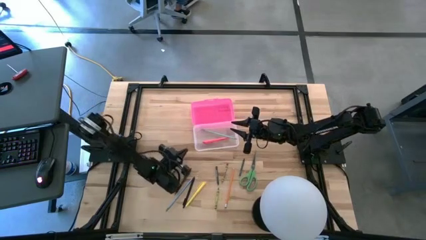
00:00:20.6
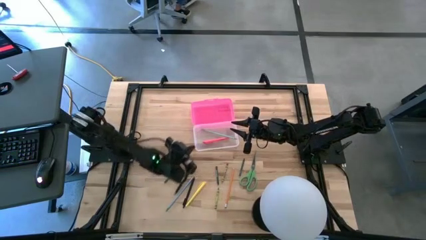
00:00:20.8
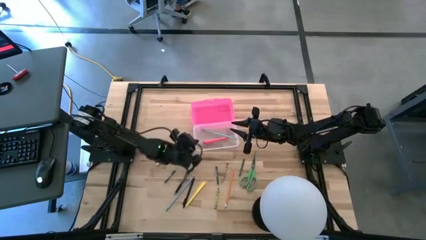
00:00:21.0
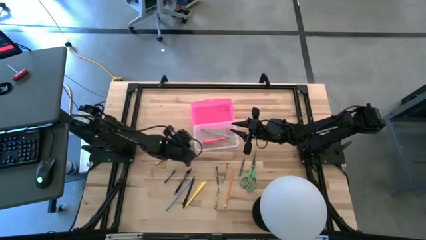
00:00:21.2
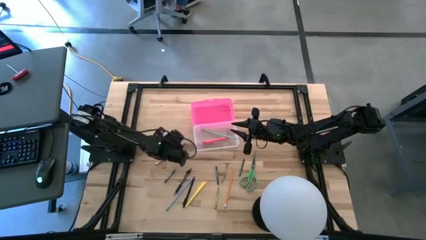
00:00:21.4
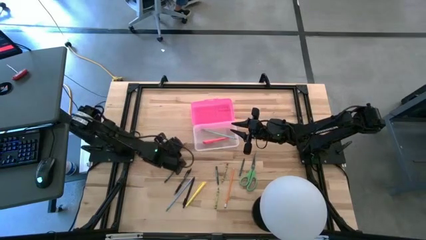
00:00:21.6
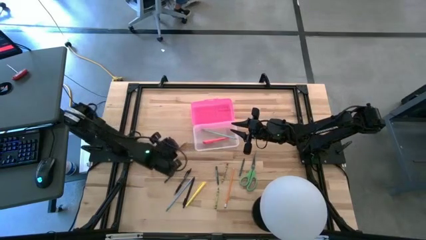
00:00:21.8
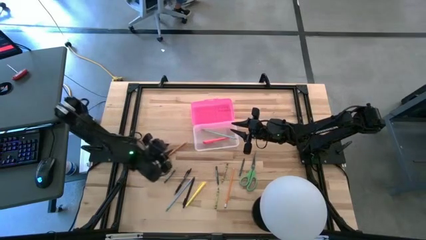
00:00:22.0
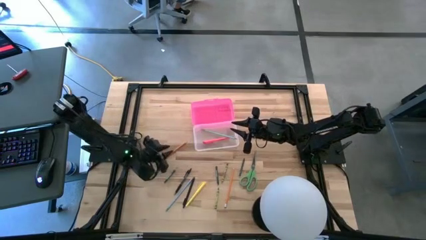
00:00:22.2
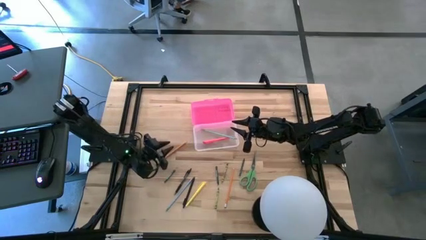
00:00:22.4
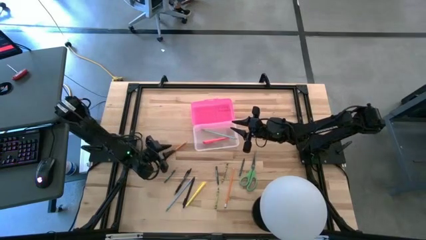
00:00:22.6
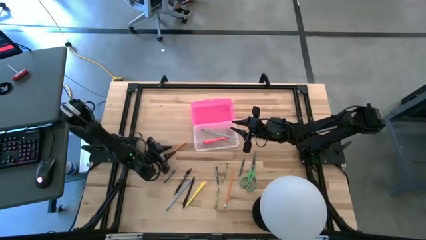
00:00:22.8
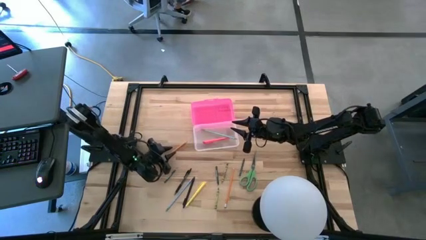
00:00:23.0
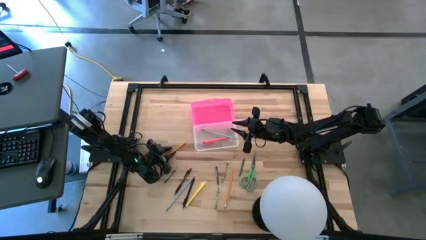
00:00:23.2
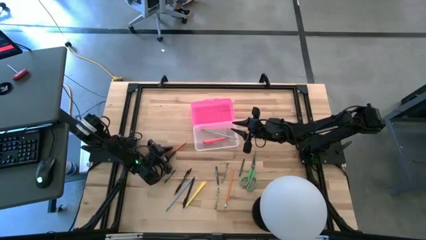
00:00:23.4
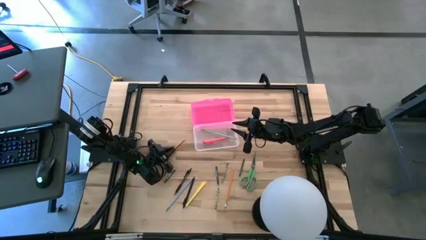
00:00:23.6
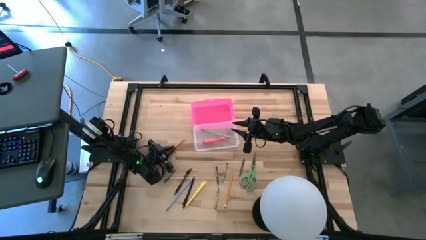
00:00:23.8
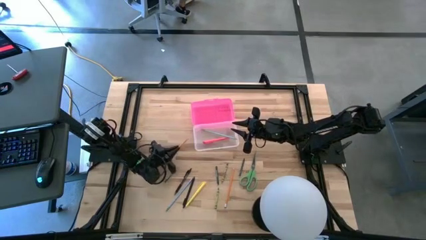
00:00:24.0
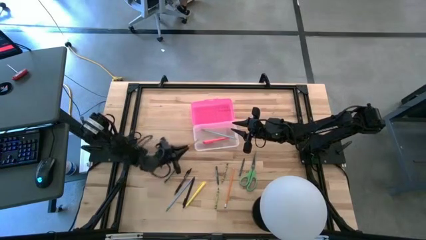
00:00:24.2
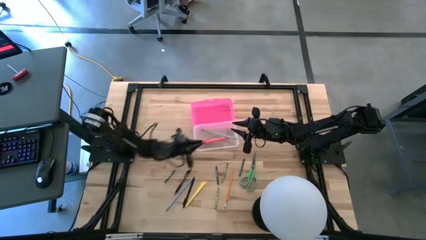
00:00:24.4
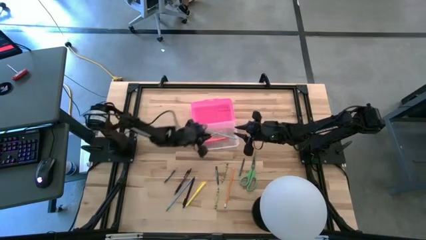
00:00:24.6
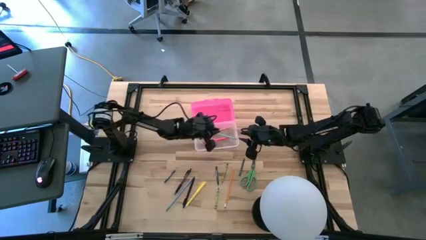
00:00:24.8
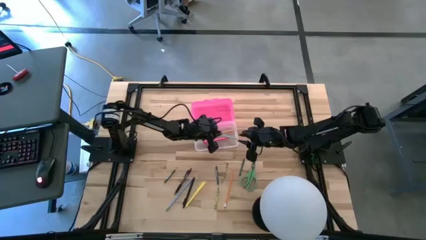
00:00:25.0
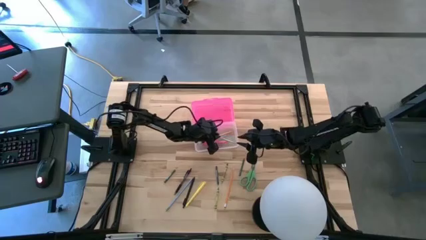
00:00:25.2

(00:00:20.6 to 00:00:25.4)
Task: Pick & place school supplies into a supply box
Put the left orange pencil into the pink supply box

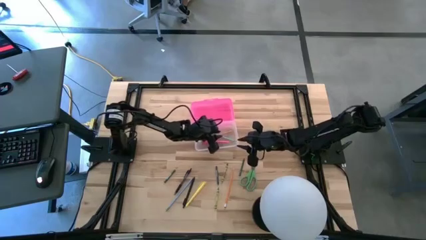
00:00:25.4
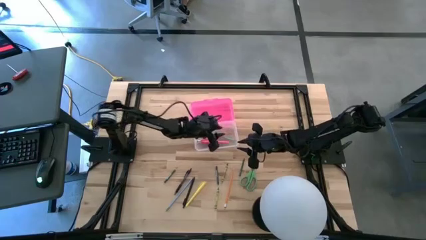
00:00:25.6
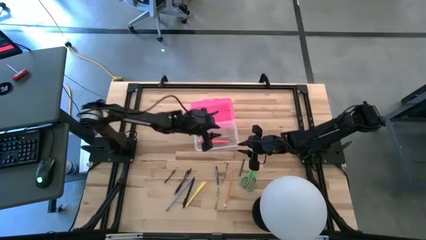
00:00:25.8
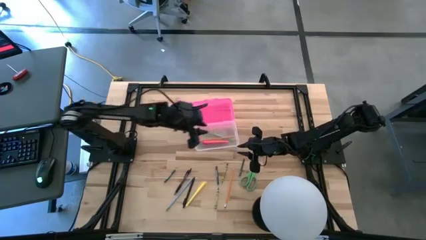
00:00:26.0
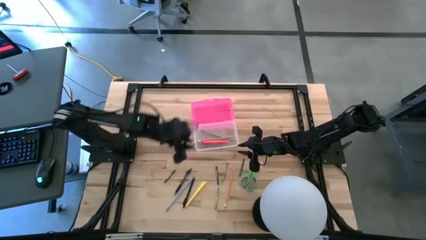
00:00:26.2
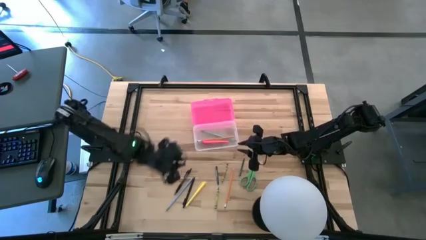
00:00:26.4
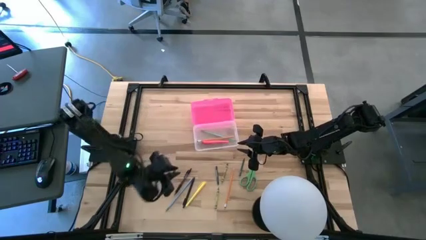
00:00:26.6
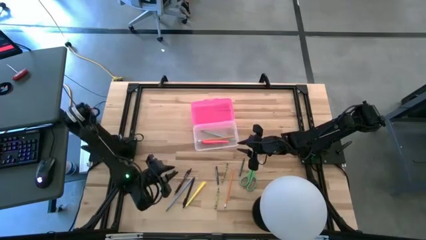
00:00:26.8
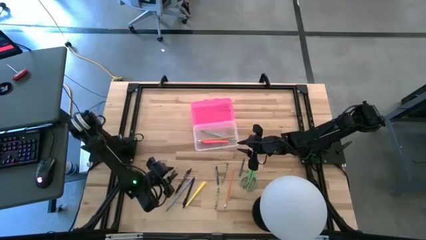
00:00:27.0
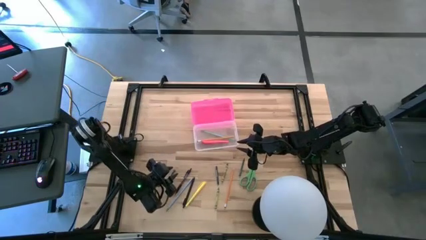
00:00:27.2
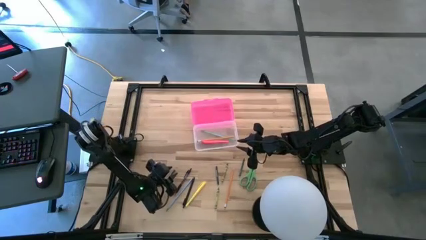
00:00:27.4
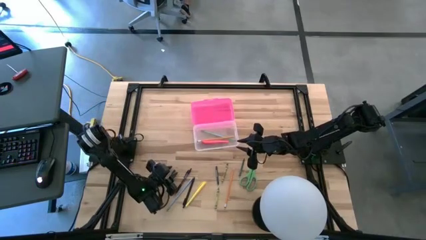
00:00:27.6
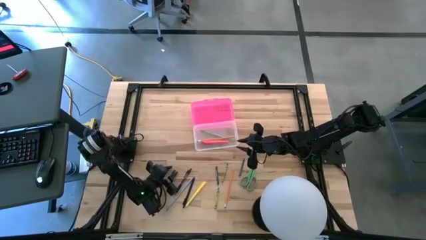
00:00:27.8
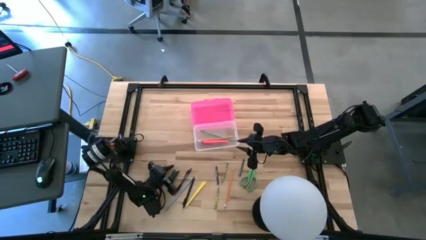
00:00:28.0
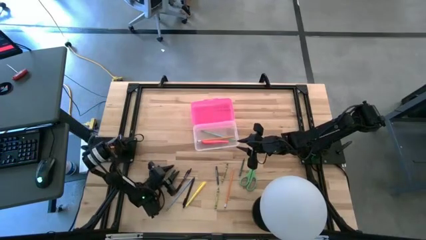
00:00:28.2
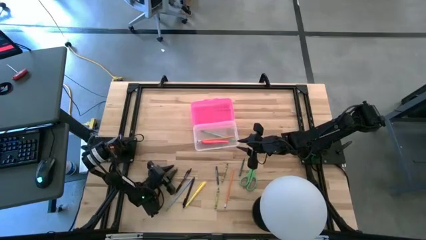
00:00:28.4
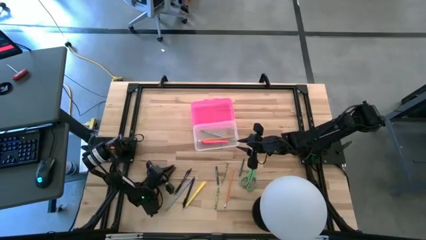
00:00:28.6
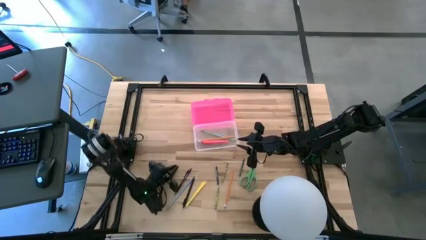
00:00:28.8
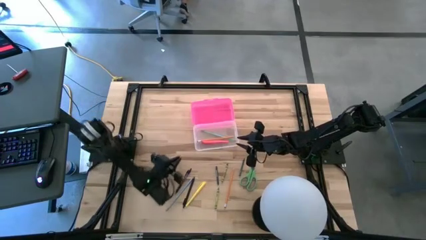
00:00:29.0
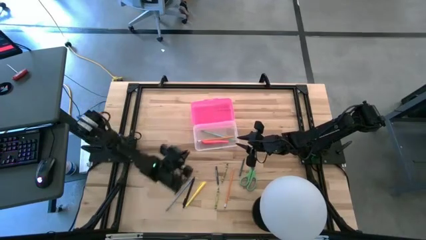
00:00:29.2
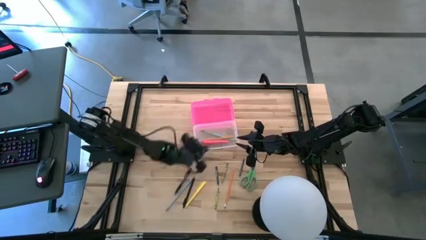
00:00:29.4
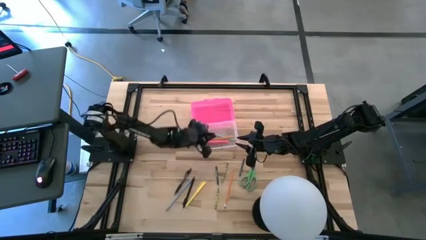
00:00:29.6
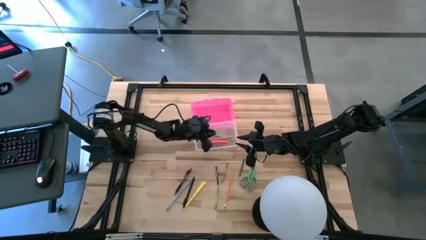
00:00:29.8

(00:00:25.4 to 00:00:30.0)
Put the left blue crayon into the pink supply box

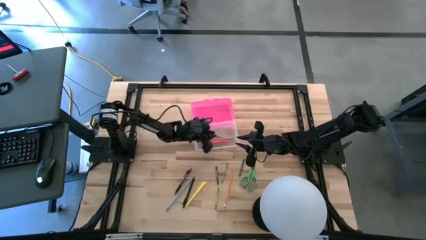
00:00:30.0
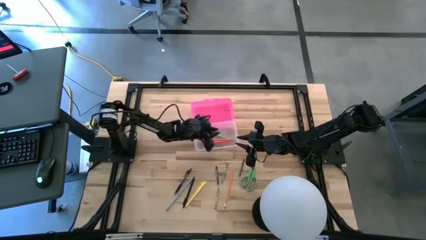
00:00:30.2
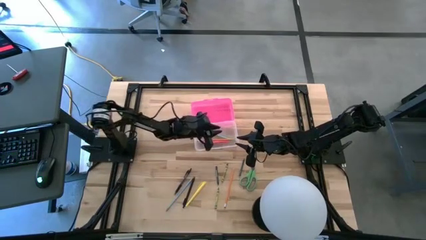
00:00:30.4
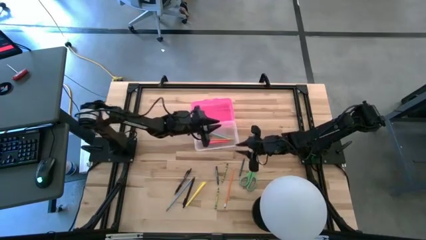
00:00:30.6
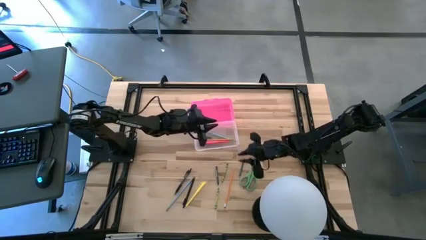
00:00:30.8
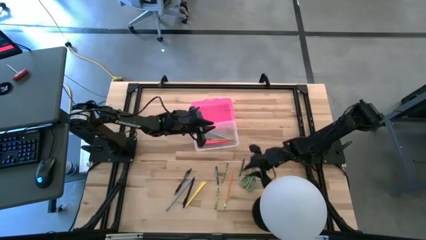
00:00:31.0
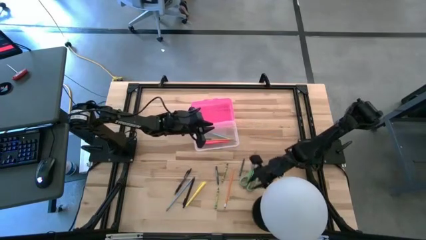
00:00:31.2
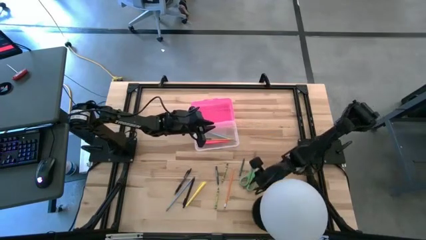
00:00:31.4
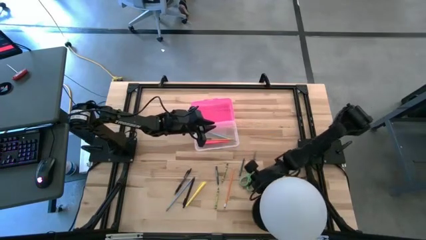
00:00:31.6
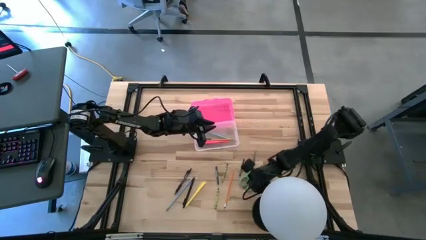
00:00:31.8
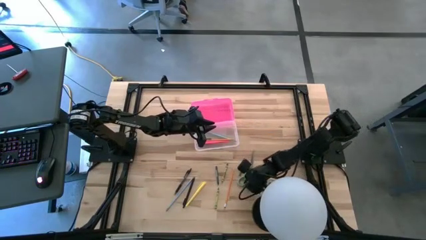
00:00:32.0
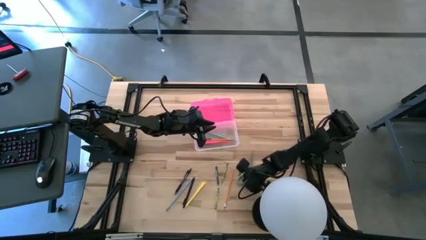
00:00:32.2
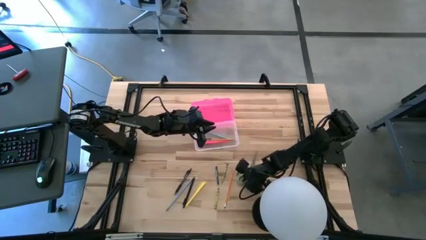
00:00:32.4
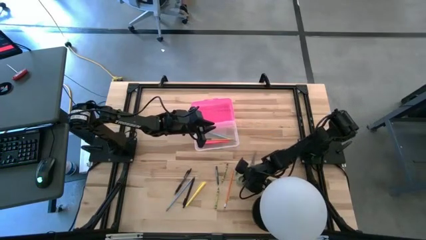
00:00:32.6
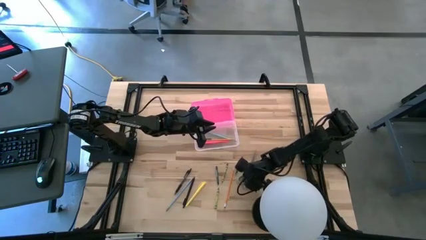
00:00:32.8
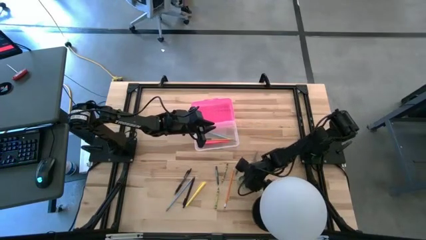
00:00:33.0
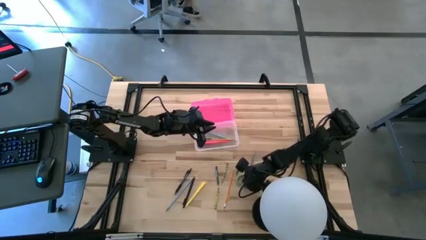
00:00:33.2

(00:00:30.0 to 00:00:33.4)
Put the green scissors into the pink supply box

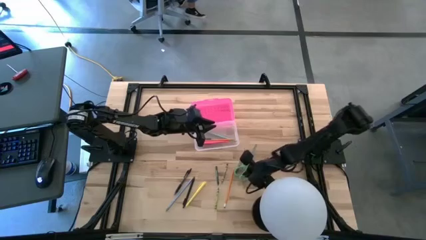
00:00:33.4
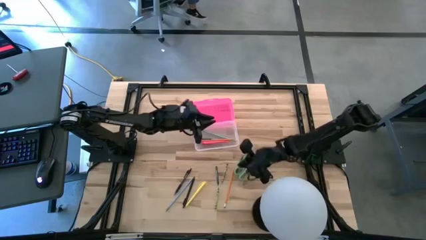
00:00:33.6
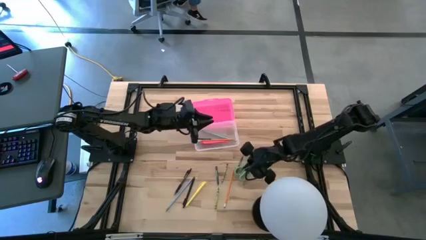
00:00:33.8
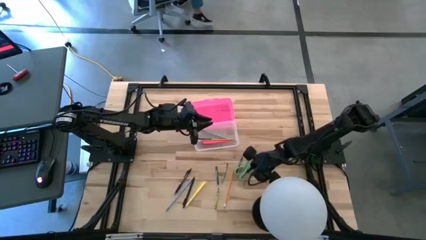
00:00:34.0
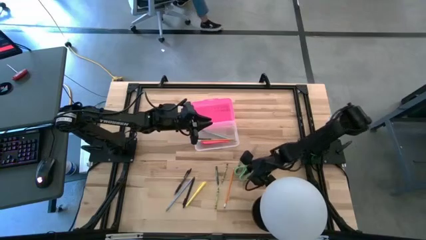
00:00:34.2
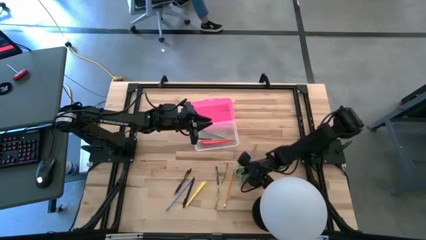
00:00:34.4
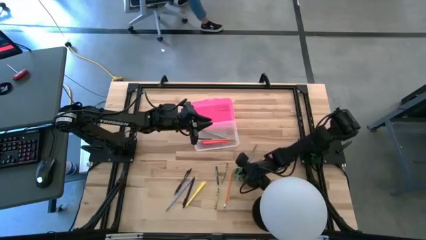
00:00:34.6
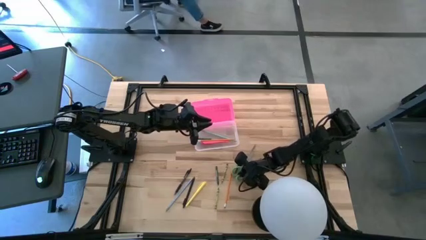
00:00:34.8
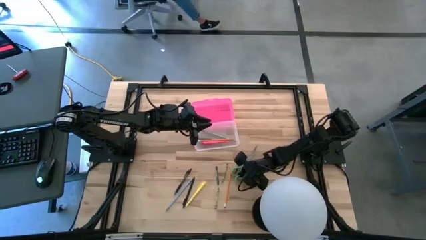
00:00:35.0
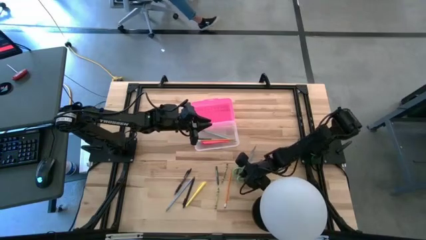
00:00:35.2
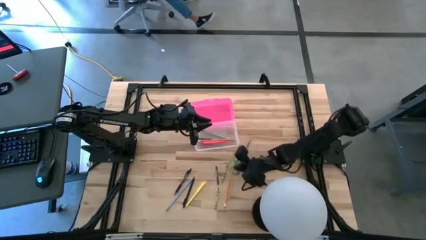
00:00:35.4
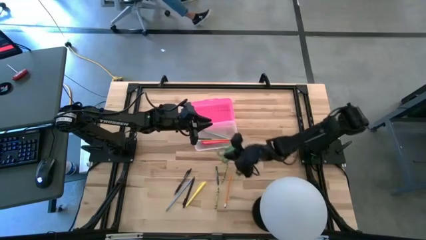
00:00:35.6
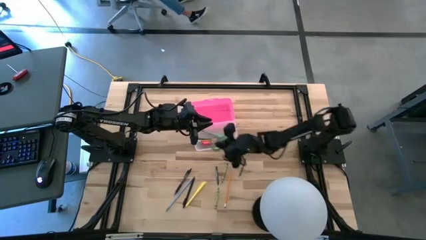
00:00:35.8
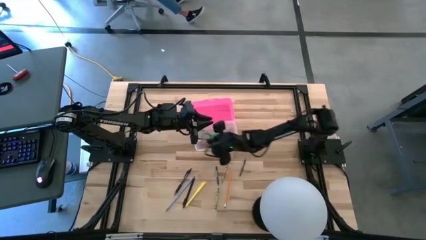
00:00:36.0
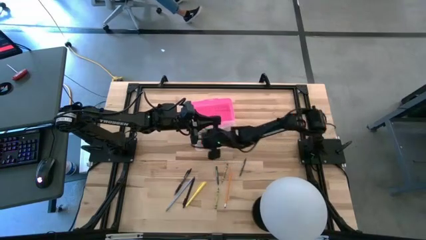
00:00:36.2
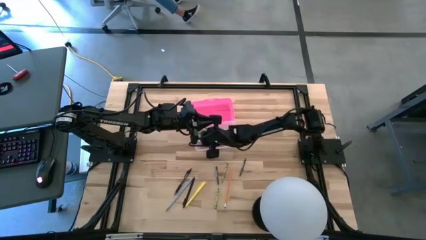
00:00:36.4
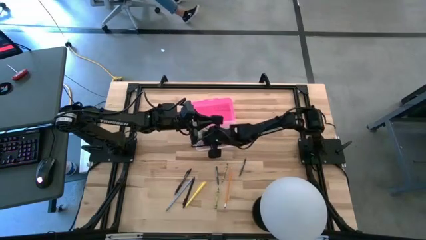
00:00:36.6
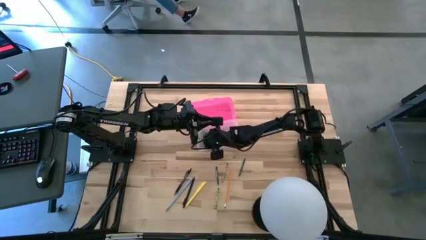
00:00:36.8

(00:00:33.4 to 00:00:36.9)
Put the green scissors into the pink supply box

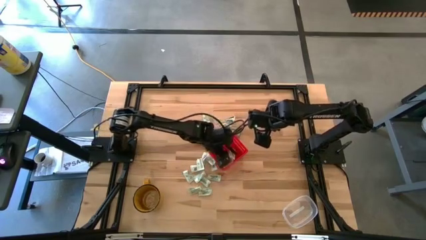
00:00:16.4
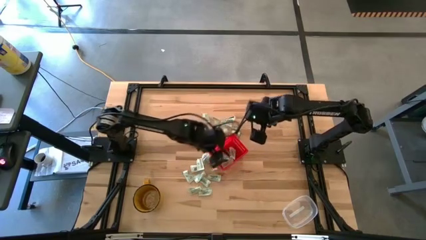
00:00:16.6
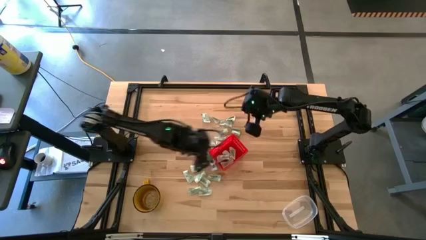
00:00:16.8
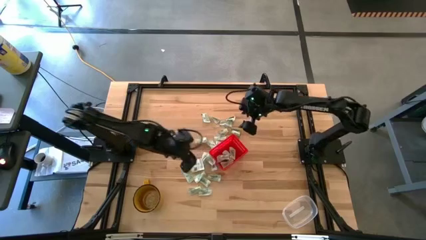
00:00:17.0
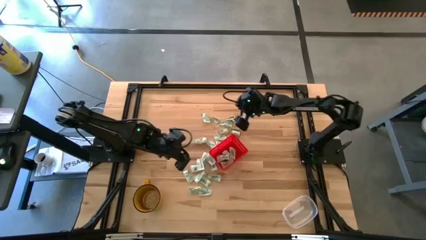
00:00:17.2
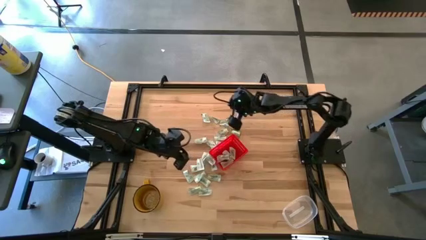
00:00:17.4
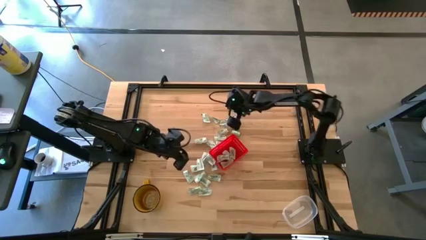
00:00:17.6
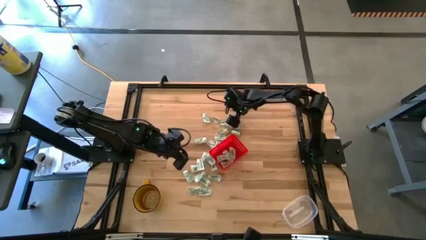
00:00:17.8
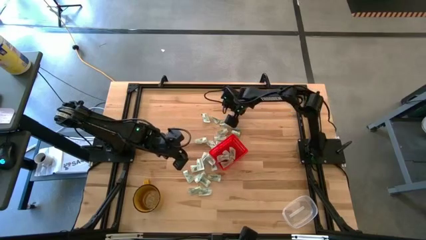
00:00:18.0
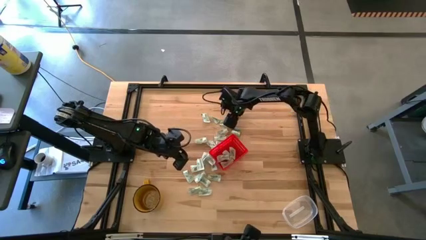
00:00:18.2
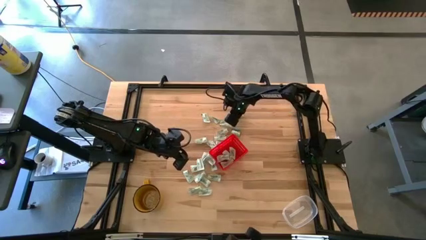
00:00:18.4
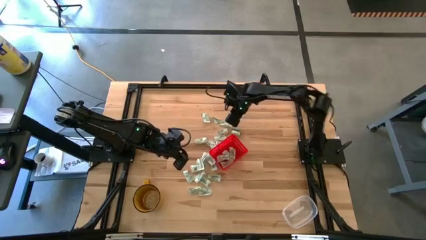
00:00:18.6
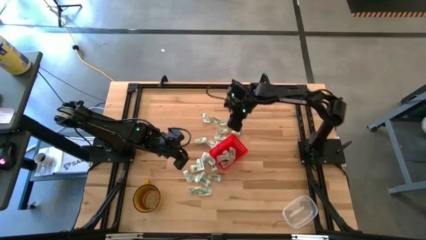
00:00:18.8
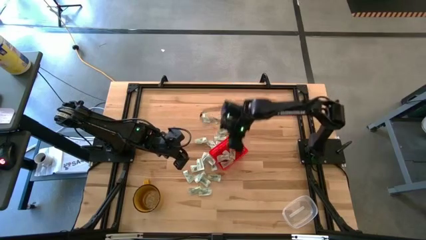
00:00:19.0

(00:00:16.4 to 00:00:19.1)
Task: Pick and place items into bin
Put the green stevia packet into the red bin
